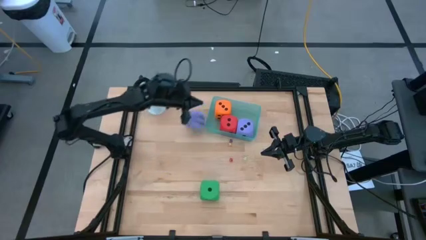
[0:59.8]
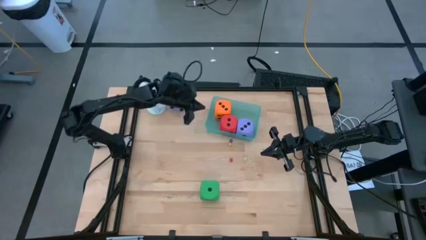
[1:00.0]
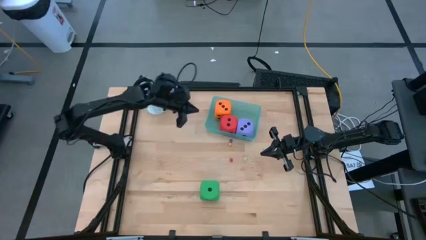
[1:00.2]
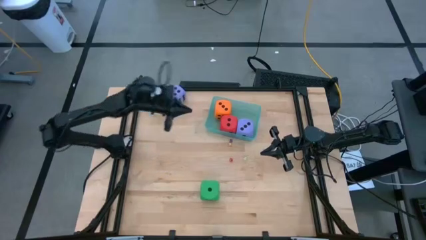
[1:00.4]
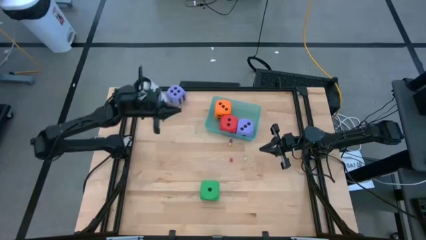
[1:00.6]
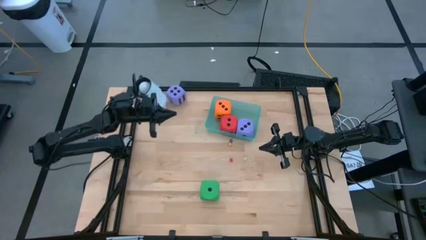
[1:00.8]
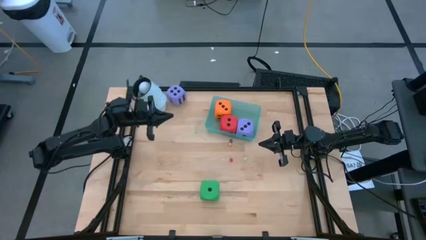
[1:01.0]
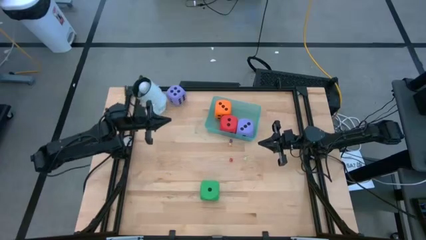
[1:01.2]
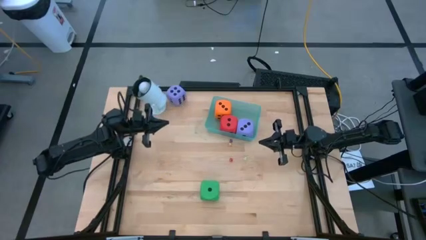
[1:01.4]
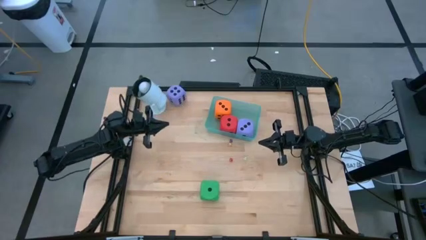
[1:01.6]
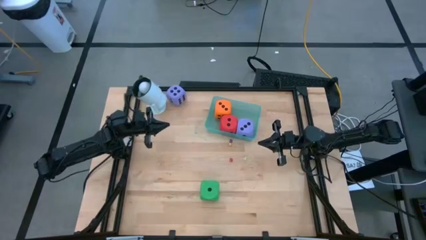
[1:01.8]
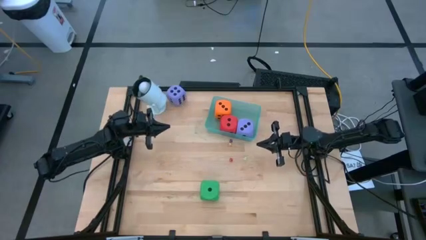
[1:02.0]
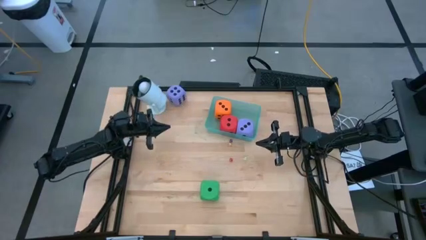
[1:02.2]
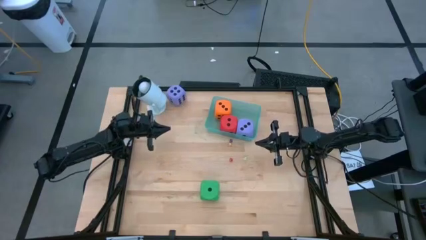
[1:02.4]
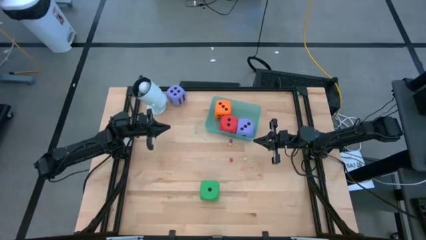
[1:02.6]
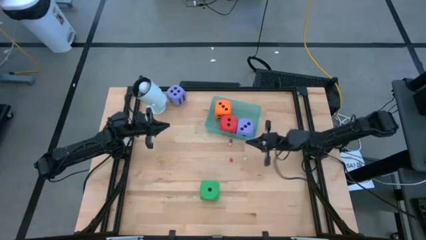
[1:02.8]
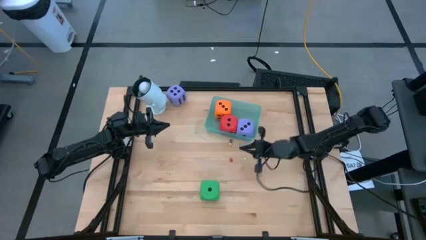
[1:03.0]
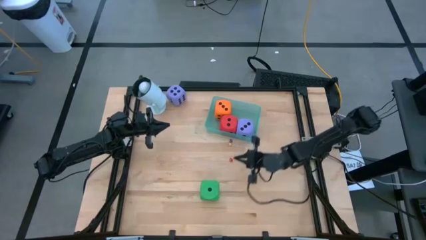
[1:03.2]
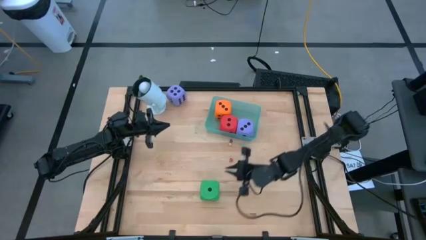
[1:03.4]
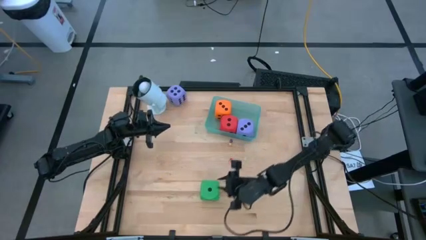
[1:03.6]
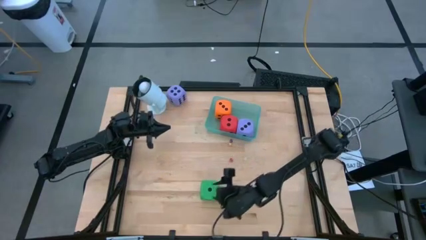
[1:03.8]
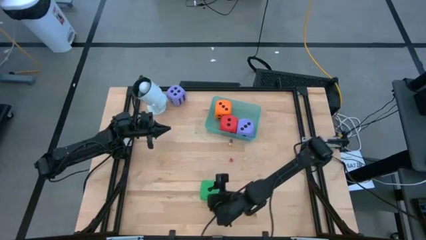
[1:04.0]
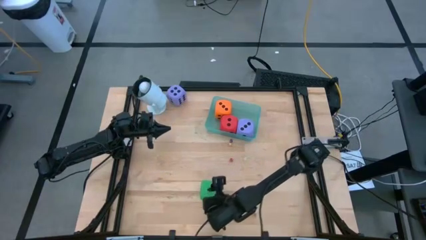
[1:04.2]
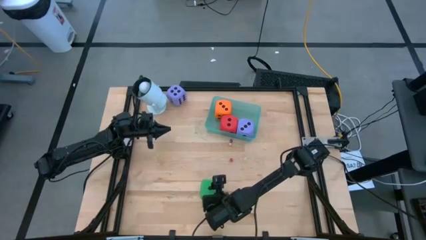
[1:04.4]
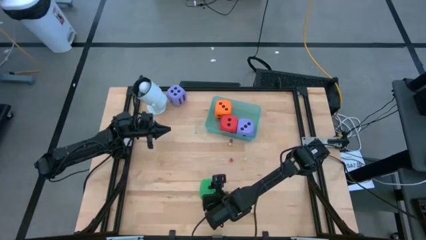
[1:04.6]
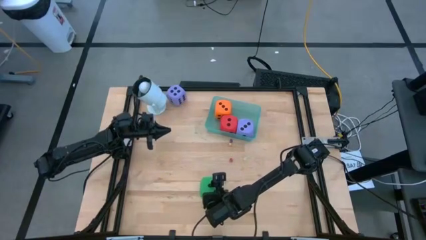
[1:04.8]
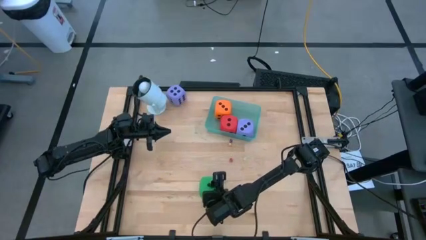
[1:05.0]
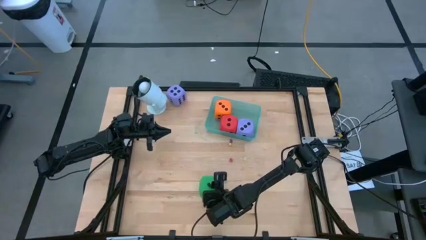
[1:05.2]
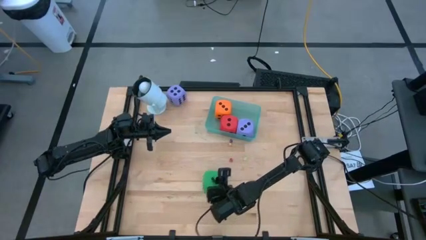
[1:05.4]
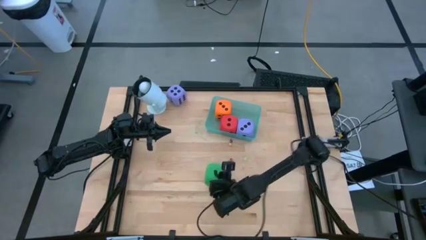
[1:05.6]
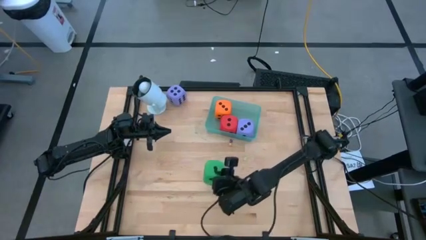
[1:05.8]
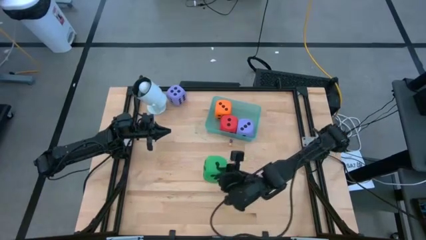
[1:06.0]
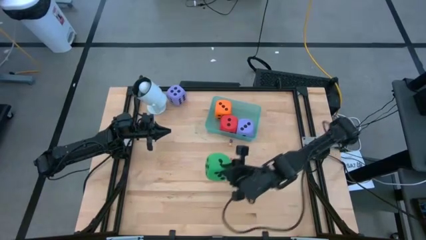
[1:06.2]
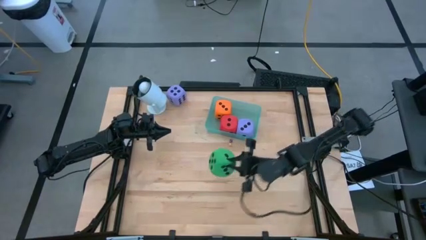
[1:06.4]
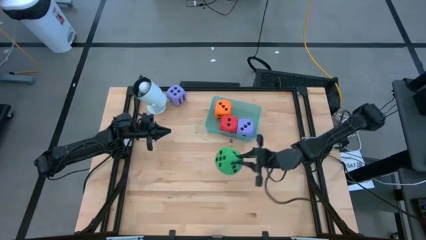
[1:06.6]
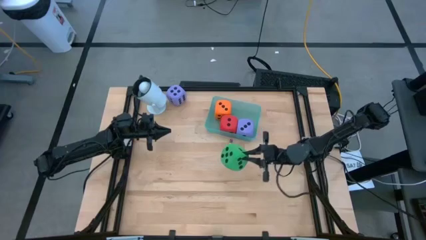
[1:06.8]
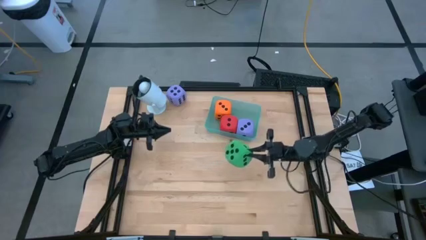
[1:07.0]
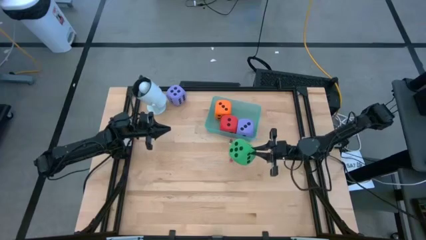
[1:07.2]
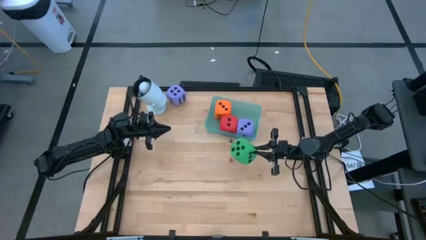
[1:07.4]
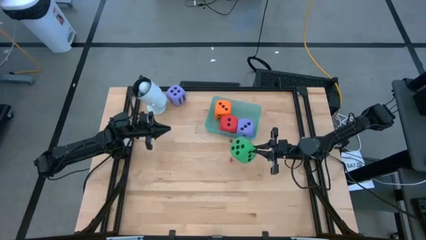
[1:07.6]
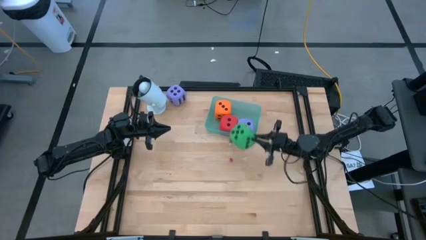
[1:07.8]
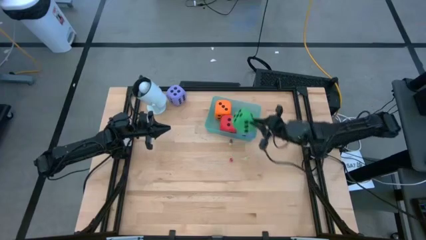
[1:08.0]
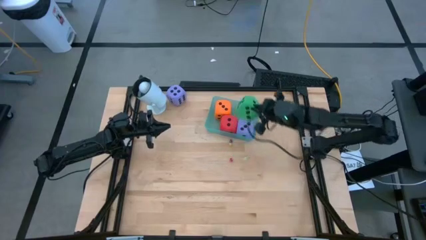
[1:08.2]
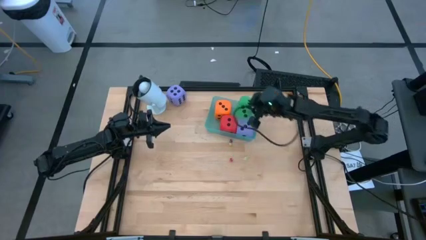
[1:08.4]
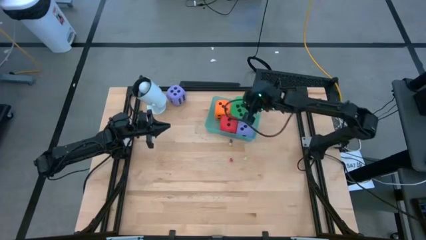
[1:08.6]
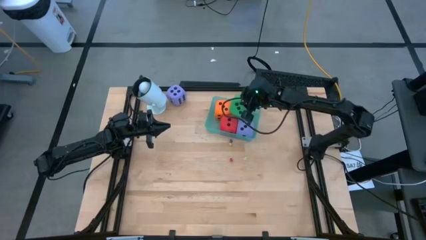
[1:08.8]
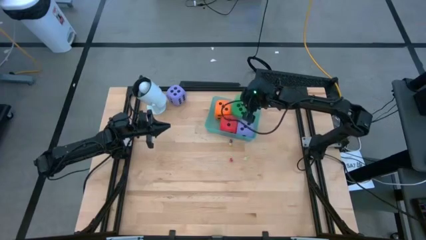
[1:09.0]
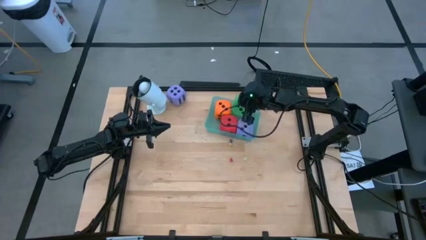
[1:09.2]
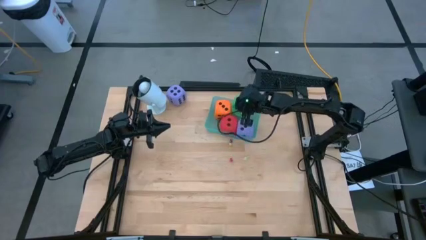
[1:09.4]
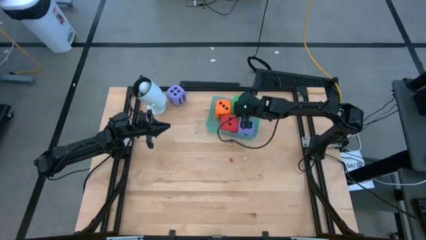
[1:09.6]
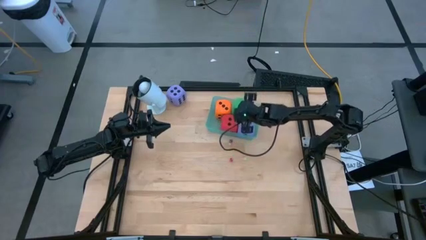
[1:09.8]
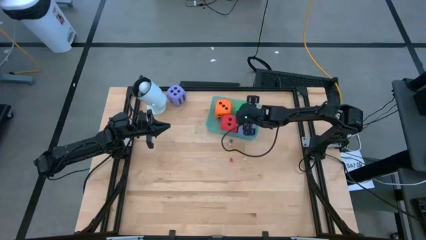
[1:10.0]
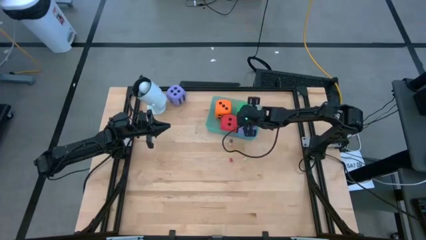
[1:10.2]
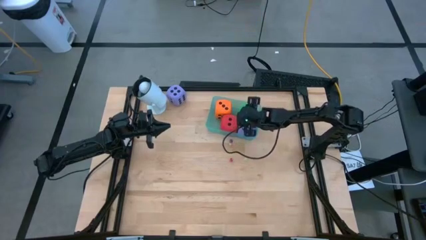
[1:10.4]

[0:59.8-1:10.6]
Task: Pick & Place Dice
Put the large green die into the blue bin

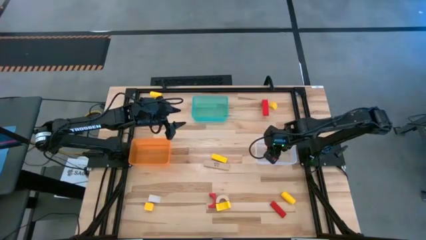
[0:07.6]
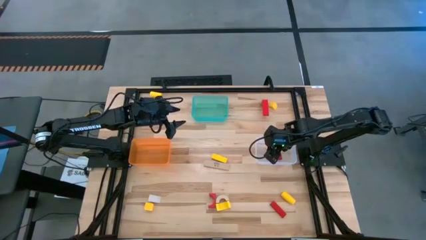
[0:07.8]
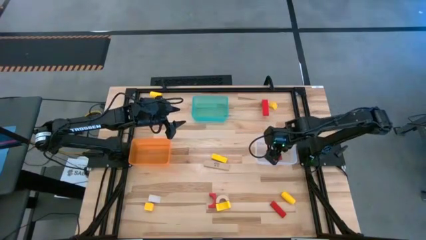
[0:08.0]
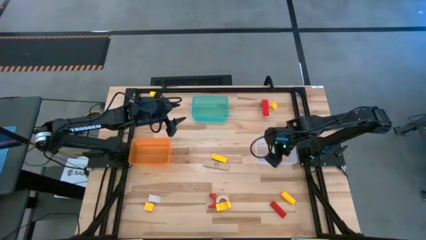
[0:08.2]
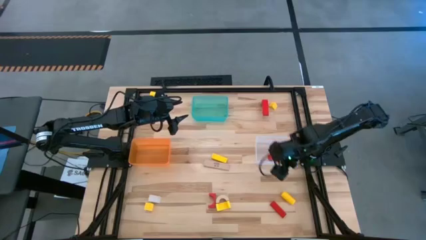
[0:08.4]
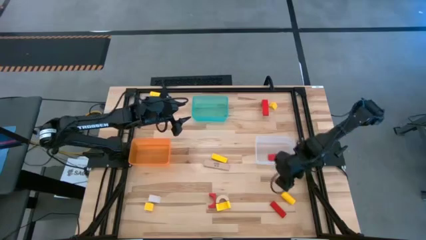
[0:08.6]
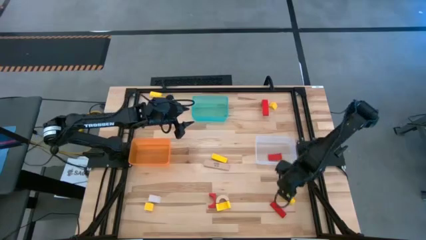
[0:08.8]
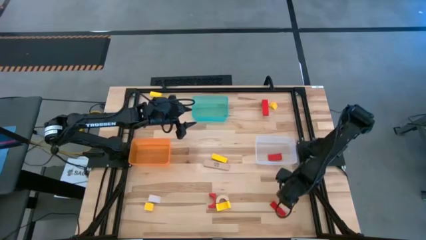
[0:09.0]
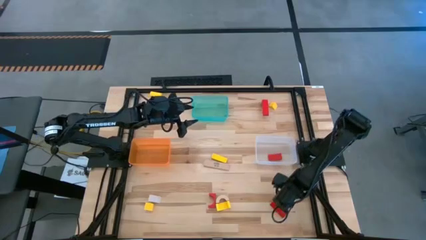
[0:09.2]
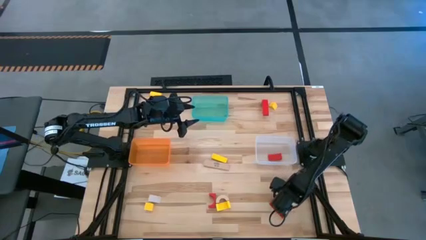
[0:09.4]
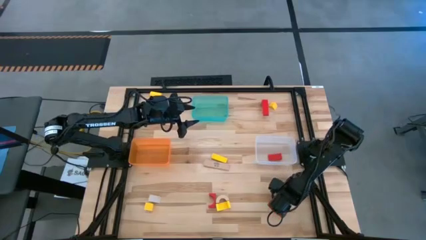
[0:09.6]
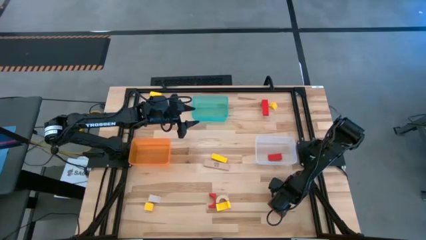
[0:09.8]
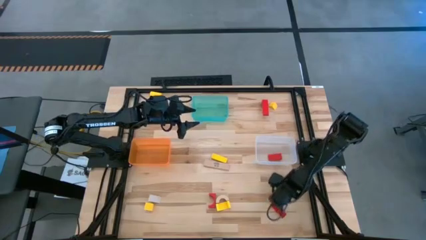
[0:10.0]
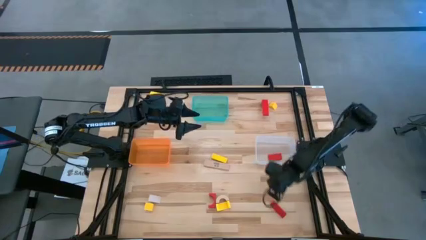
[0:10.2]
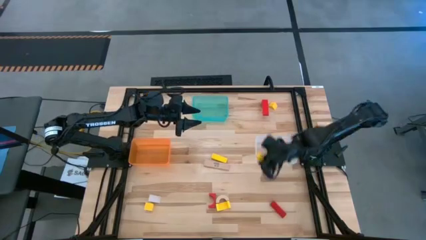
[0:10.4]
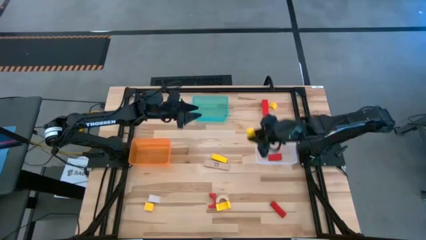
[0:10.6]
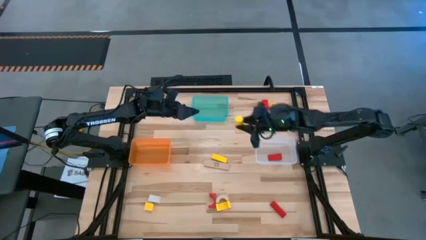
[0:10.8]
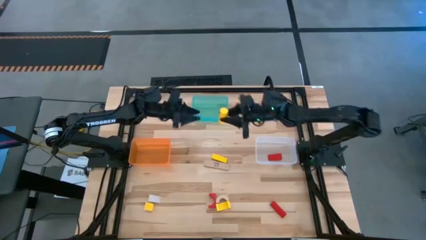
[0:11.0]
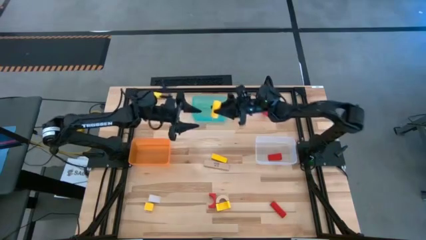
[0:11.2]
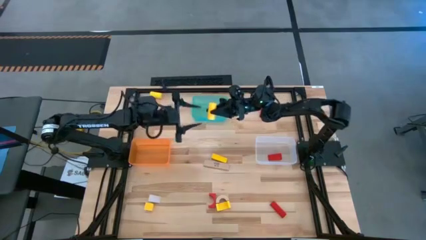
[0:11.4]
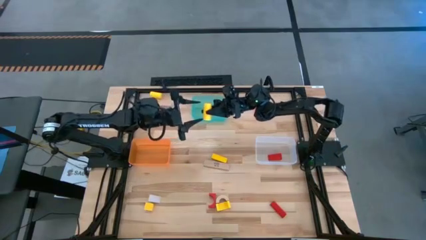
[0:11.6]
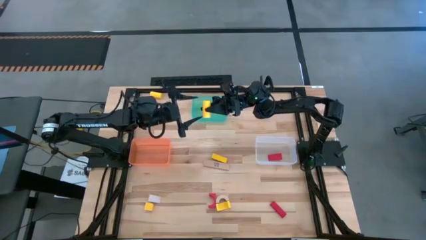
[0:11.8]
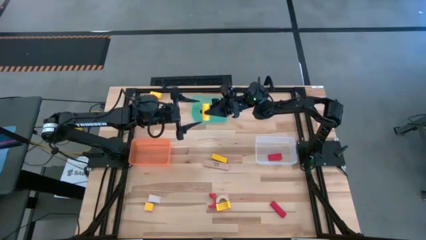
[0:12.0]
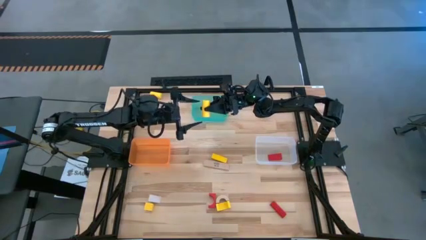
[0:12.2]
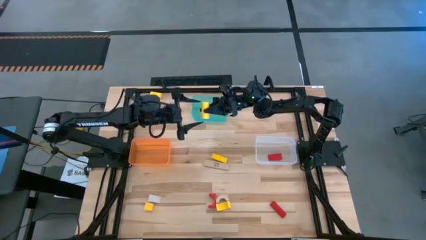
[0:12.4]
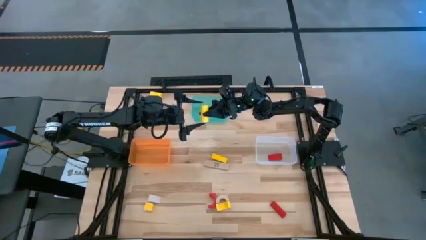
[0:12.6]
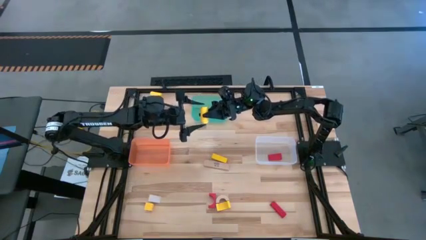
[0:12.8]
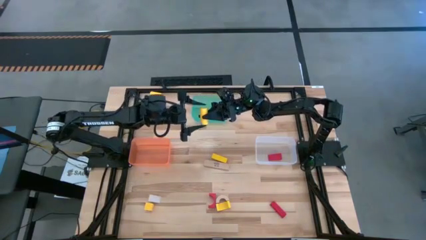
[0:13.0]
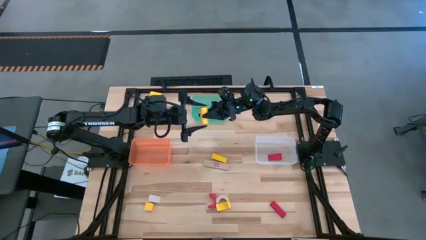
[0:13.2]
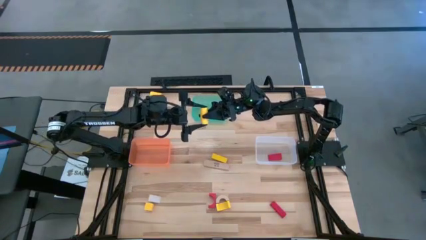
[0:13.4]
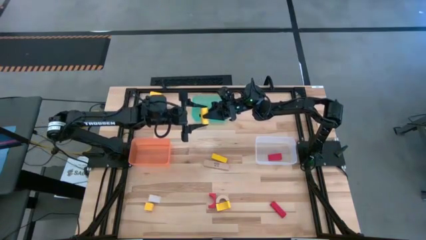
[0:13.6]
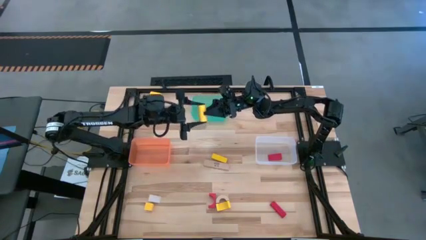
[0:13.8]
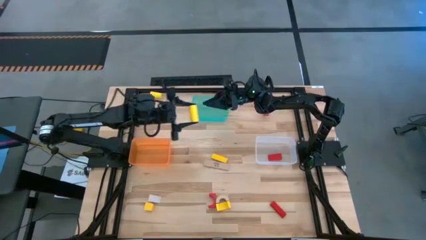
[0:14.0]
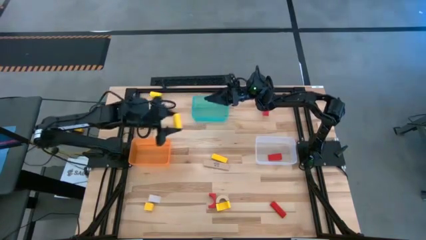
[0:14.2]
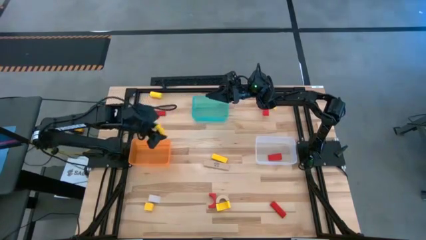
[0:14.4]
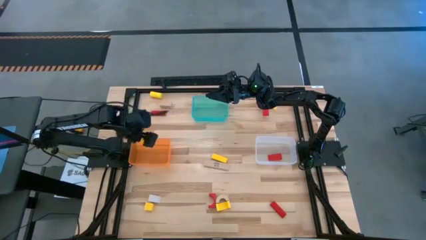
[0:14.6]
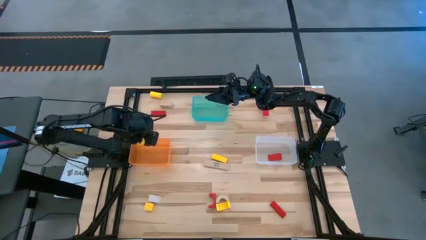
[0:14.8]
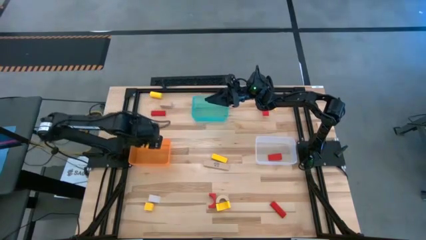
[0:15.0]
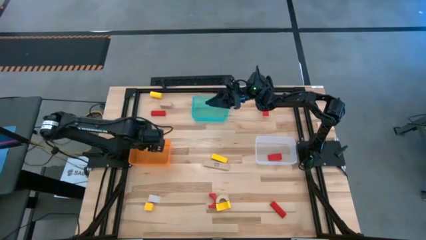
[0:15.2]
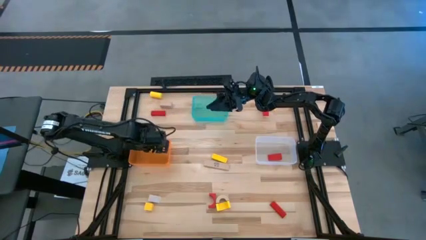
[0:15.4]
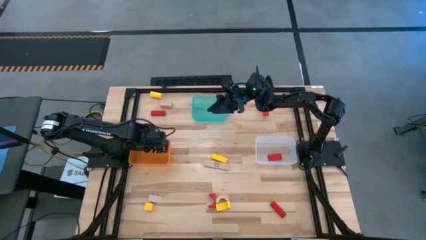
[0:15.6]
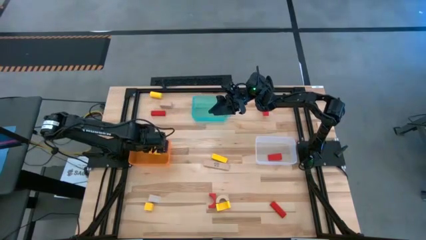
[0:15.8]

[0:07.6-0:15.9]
Task: Sort & place blocks by color
Put the yellow block into the orange bin
